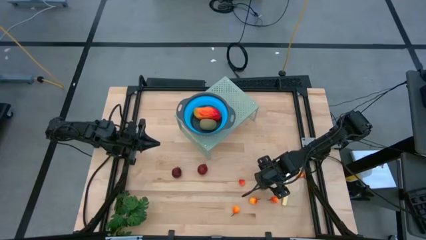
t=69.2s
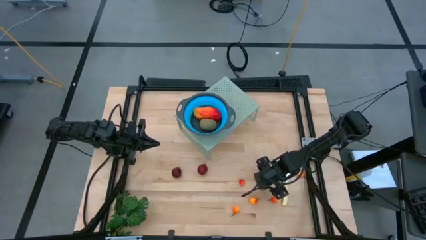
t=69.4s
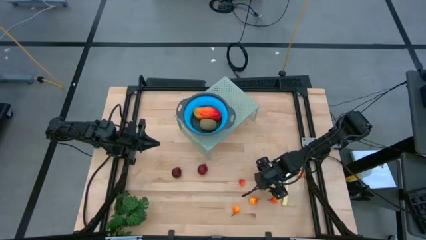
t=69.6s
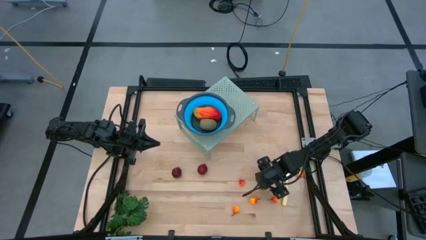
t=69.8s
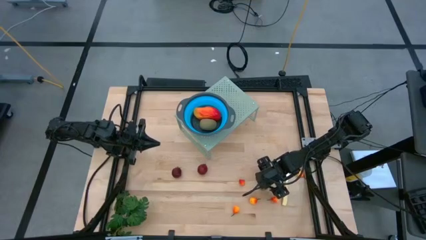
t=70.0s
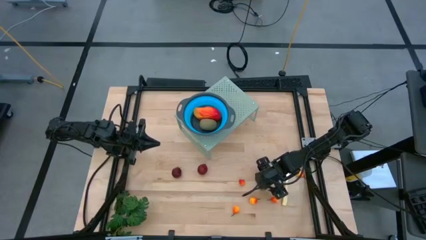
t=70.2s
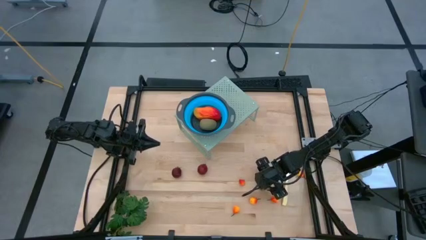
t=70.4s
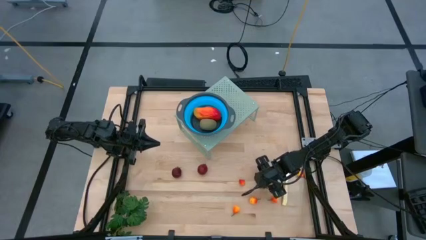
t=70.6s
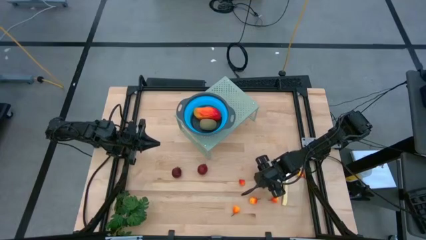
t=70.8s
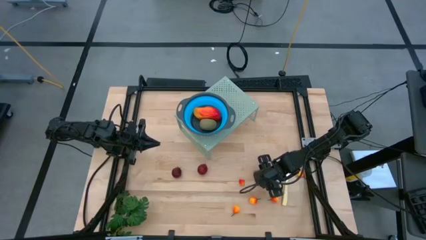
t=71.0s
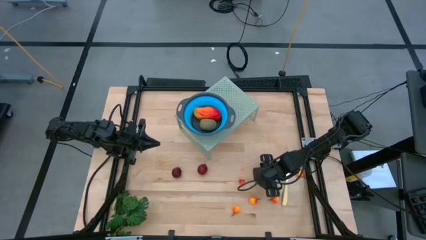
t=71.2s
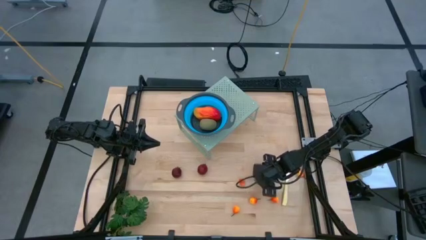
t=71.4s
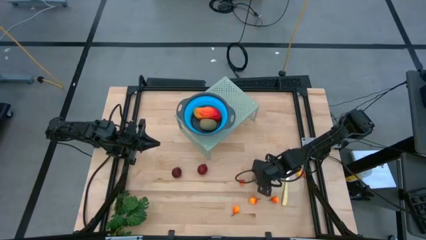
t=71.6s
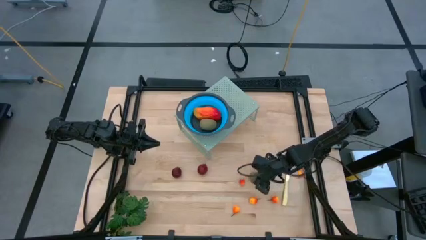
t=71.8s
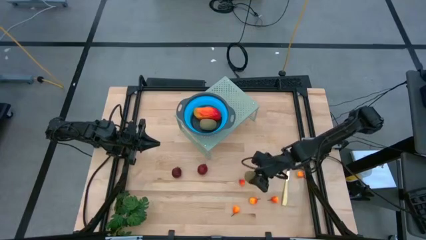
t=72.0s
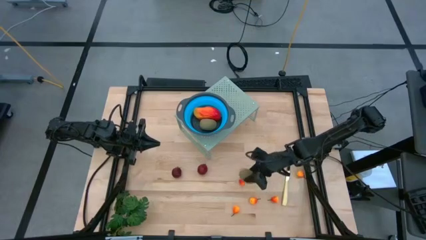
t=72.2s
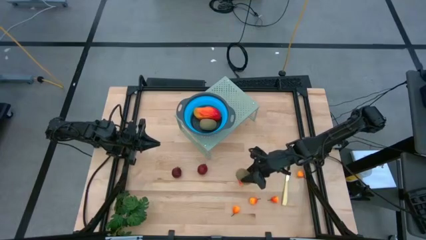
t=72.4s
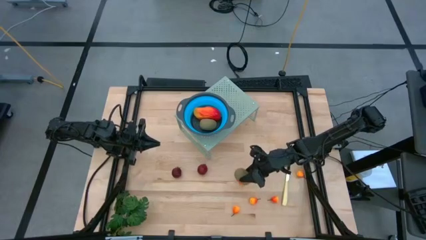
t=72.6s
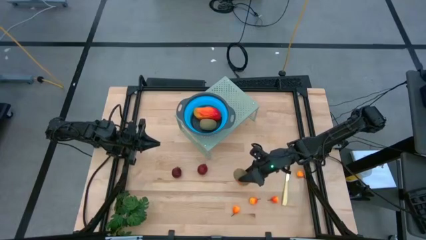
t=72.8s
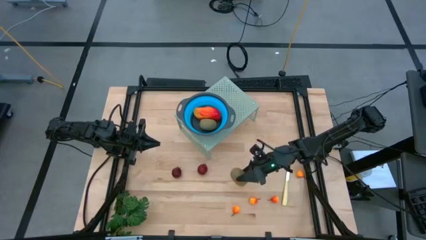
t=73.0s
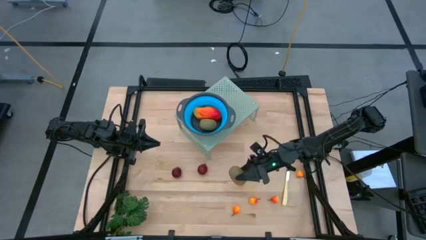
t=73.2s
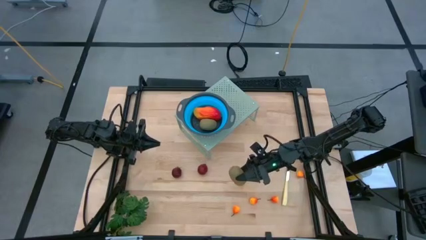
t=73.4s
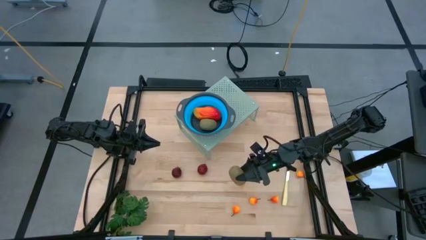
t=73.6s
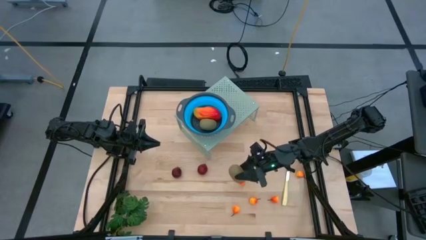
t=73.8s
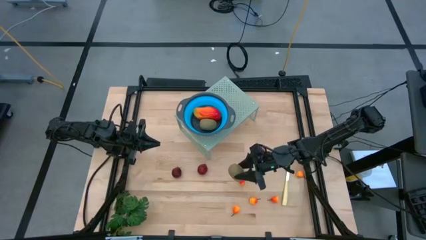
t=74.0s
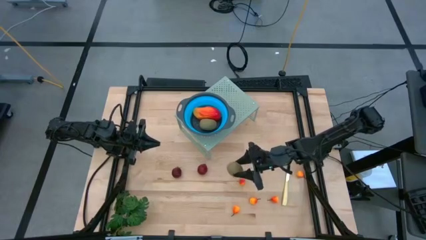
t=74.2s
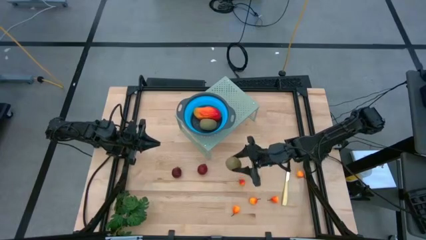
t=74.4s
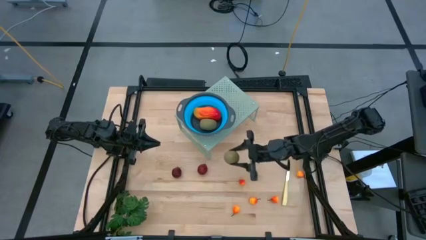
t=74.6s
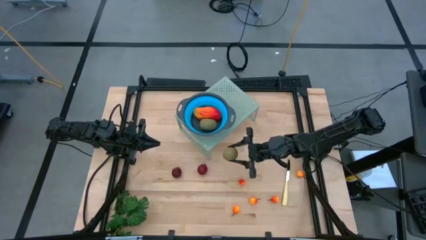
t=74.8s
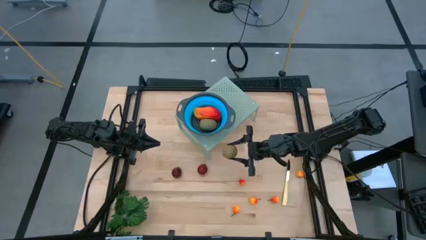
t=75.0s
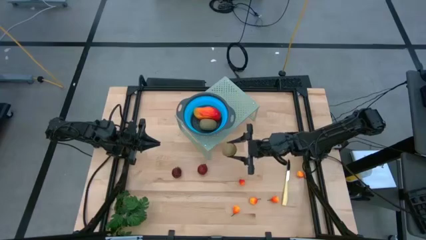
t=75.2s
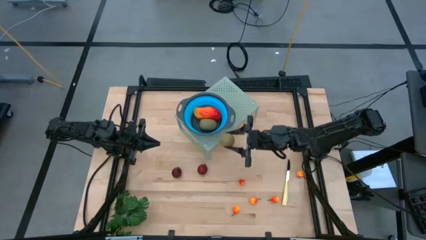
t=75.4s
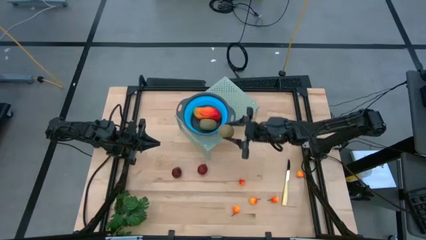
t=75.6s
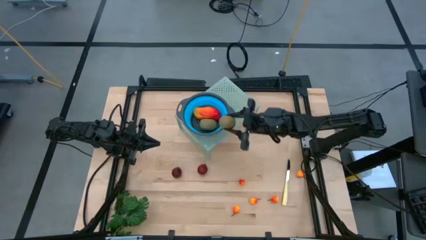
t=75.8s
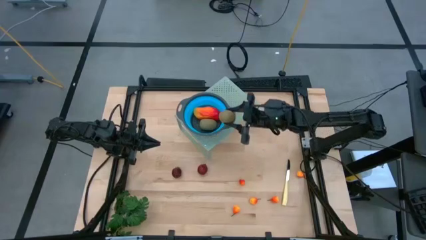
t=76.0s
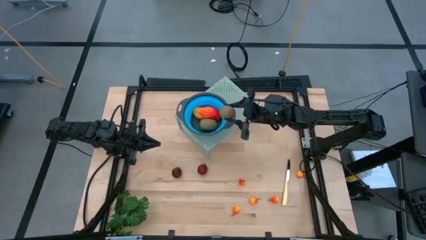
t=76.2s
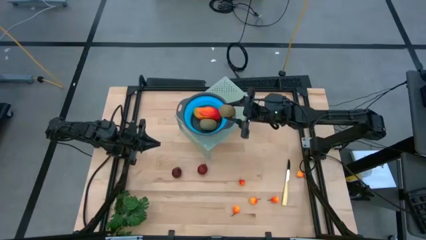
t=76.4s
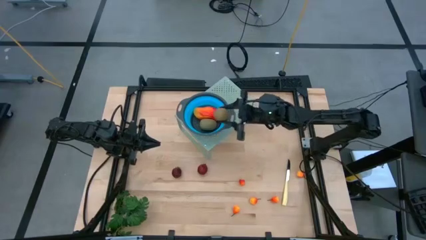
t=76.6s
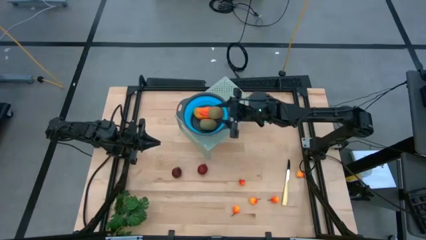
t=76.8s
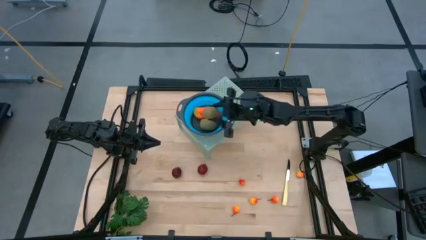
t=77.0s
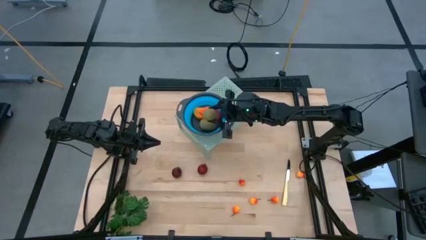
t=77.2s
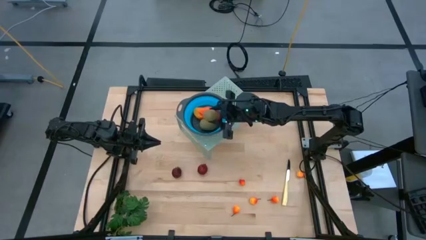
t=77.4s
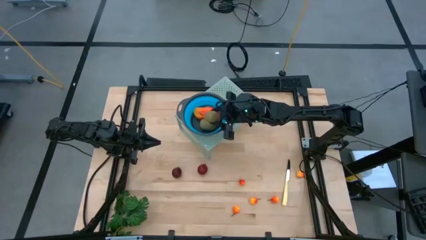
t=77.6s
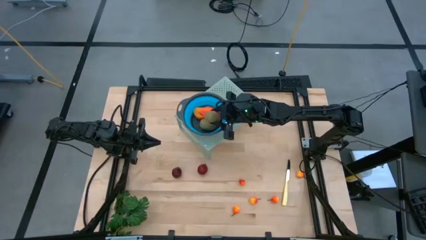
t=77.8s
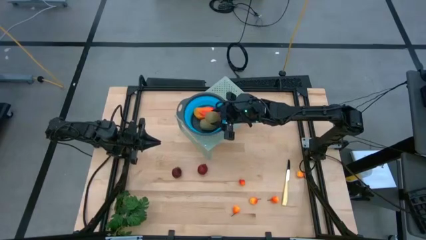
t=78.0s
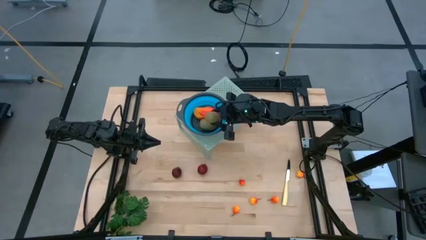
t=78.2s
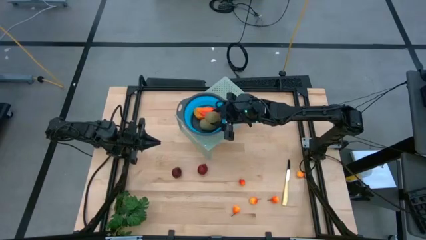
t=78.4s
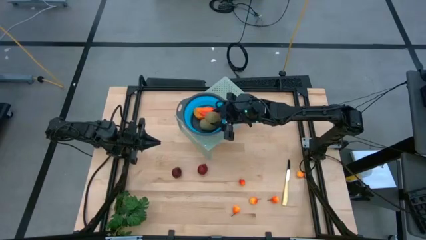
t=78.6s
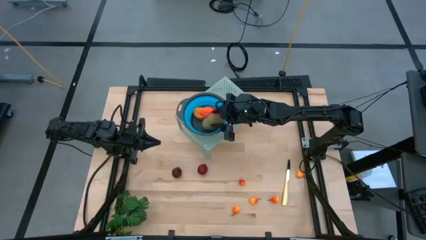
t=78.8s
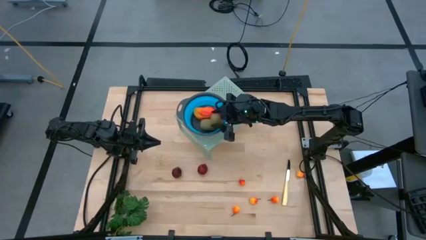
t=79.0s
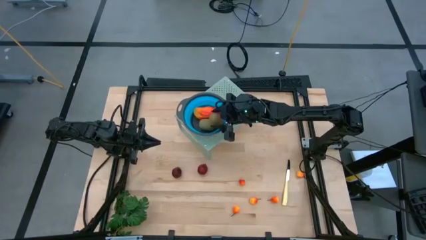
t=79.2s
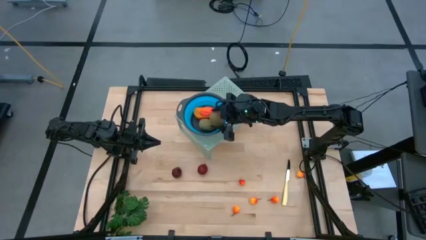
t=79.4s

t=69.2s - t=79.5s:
Task: Pick & Place Fruit
Put the kiwi into the collapsible colander on the shelf
